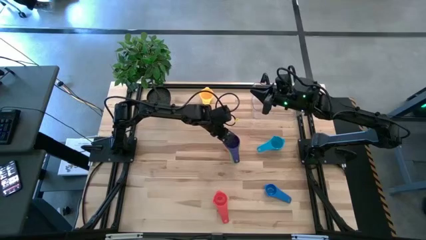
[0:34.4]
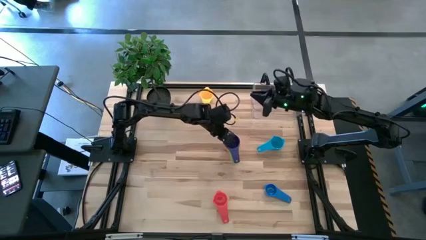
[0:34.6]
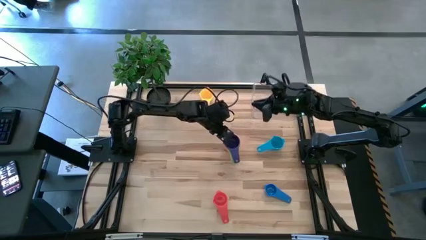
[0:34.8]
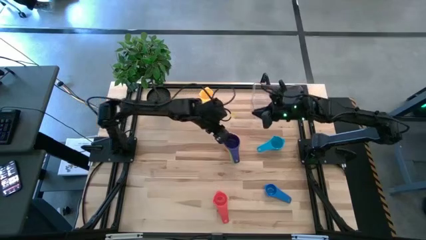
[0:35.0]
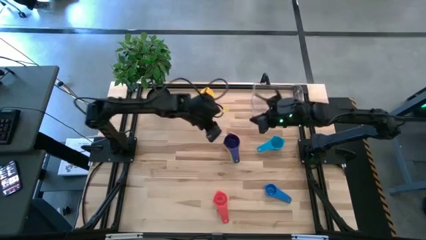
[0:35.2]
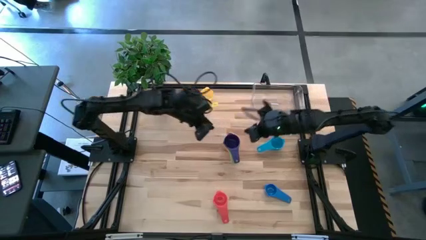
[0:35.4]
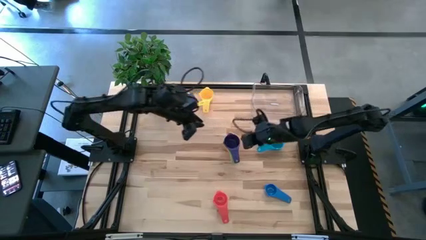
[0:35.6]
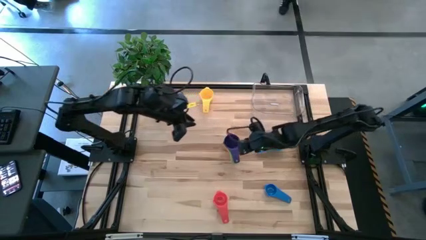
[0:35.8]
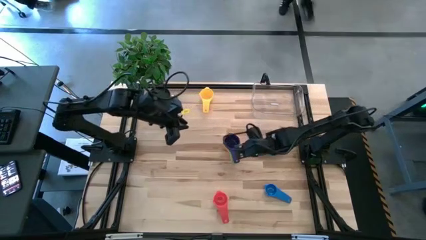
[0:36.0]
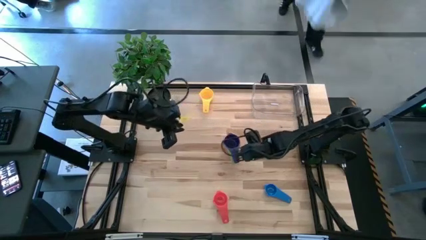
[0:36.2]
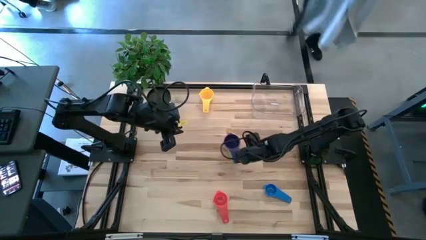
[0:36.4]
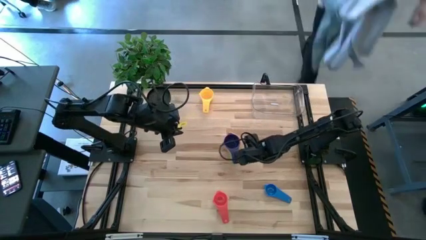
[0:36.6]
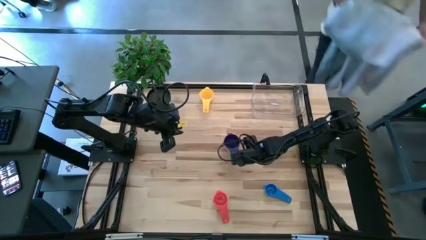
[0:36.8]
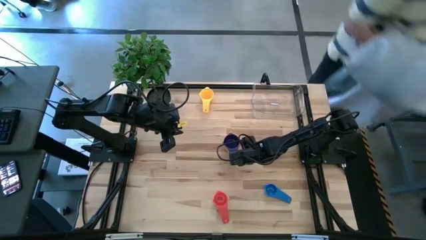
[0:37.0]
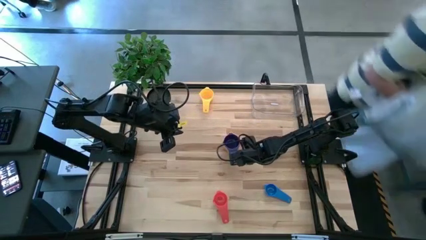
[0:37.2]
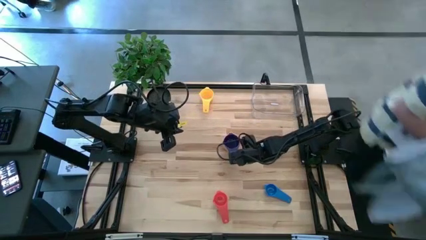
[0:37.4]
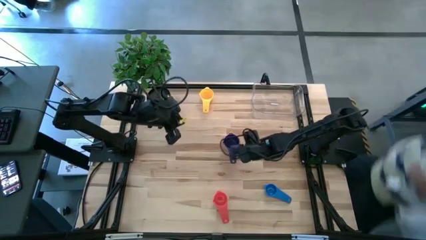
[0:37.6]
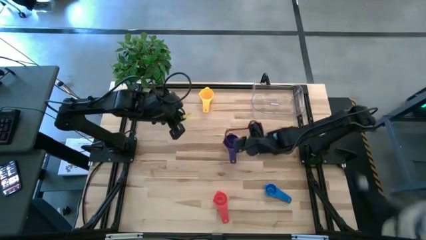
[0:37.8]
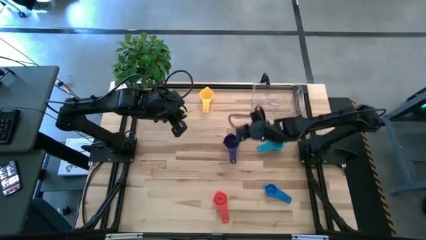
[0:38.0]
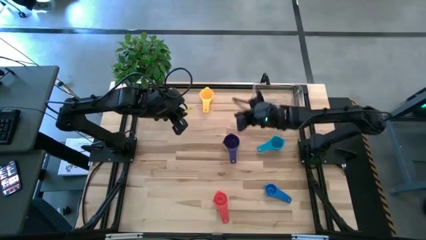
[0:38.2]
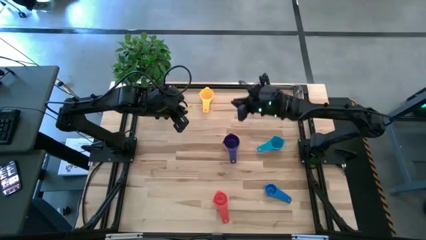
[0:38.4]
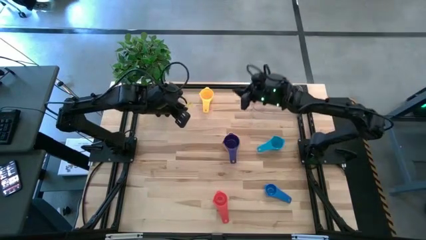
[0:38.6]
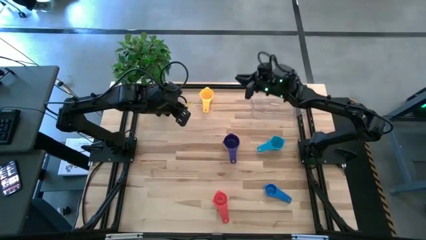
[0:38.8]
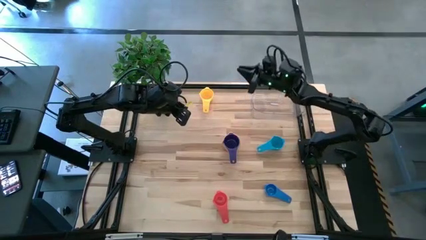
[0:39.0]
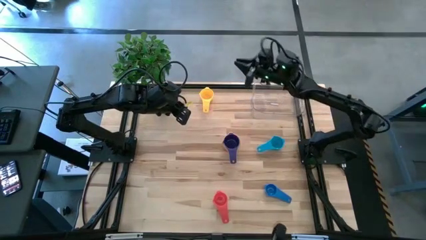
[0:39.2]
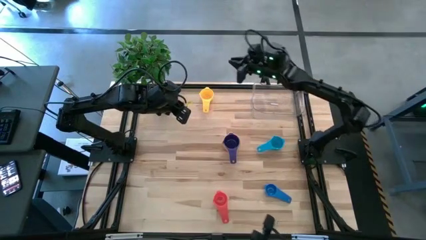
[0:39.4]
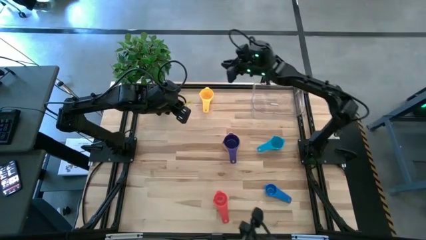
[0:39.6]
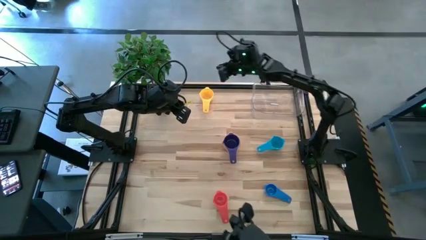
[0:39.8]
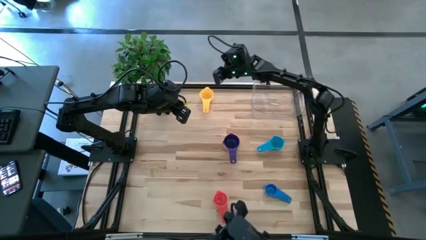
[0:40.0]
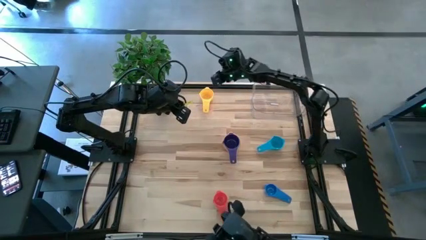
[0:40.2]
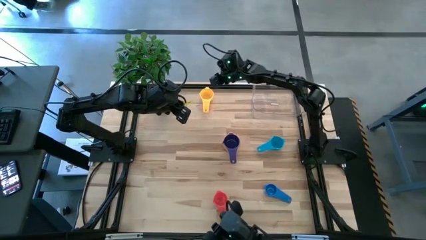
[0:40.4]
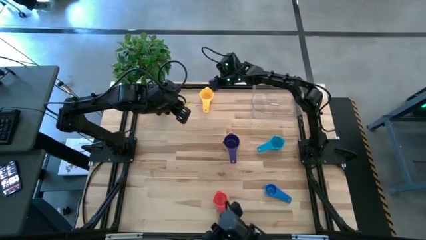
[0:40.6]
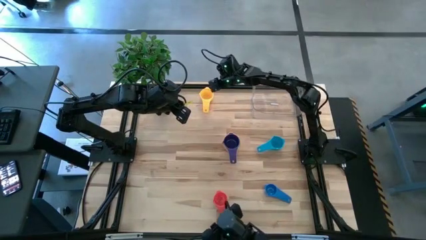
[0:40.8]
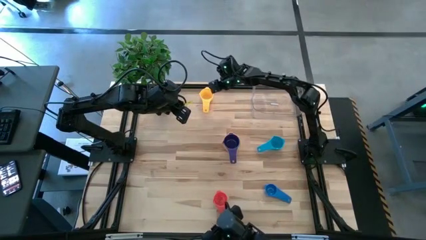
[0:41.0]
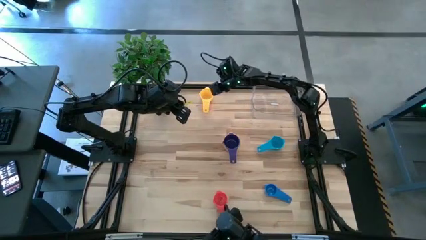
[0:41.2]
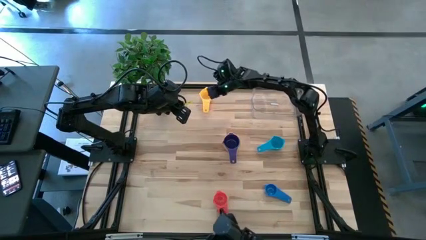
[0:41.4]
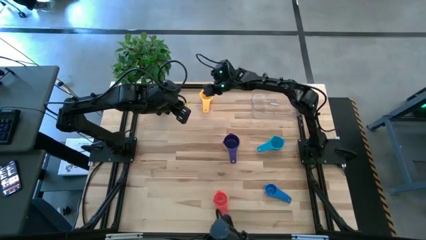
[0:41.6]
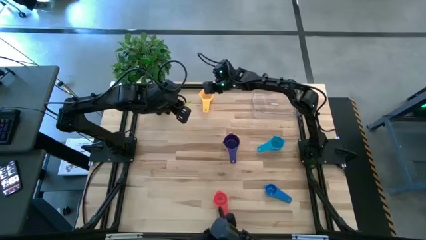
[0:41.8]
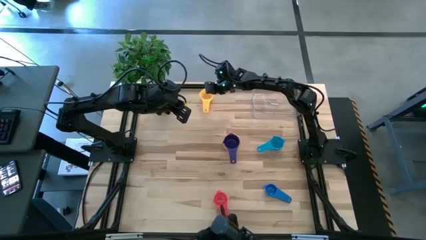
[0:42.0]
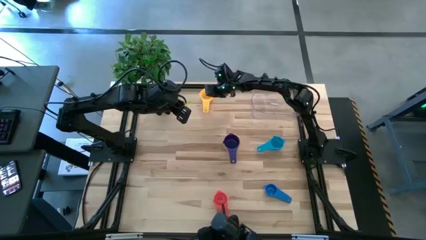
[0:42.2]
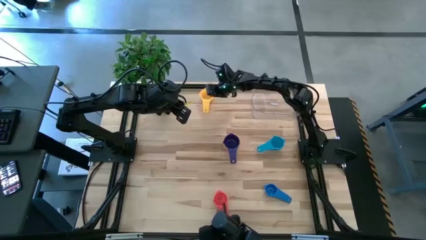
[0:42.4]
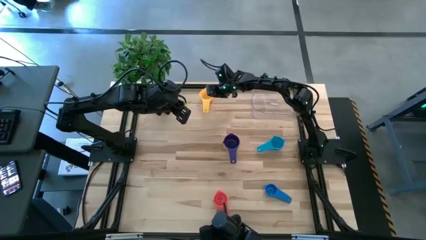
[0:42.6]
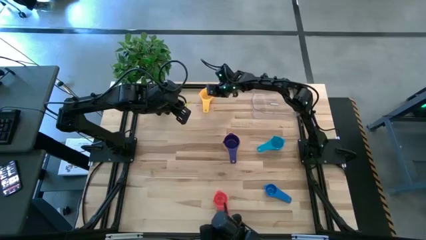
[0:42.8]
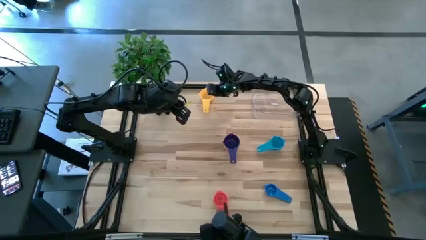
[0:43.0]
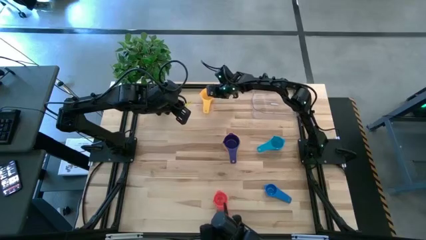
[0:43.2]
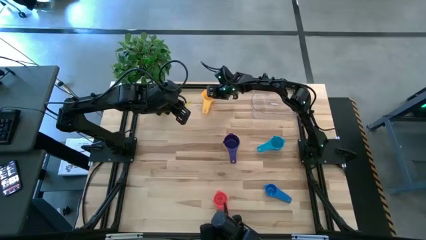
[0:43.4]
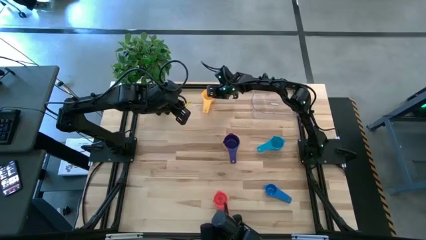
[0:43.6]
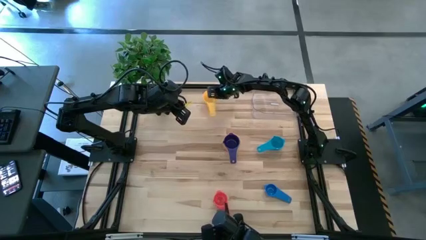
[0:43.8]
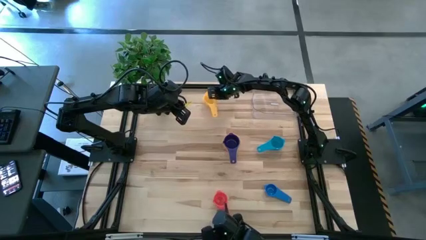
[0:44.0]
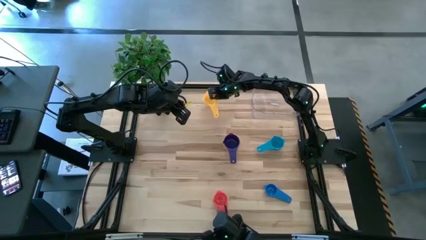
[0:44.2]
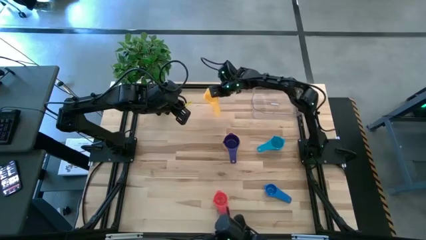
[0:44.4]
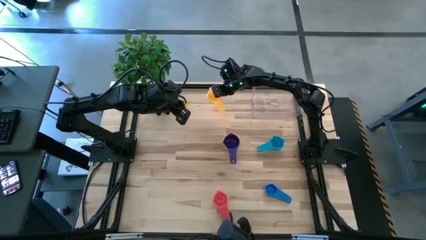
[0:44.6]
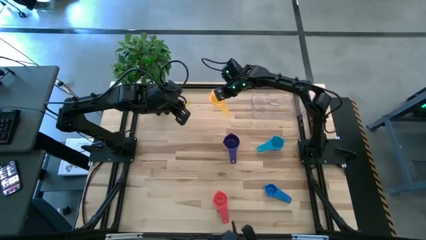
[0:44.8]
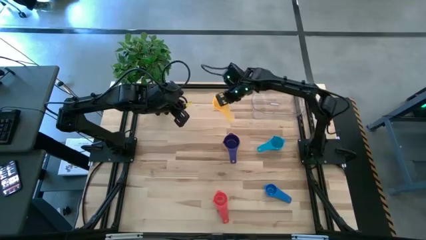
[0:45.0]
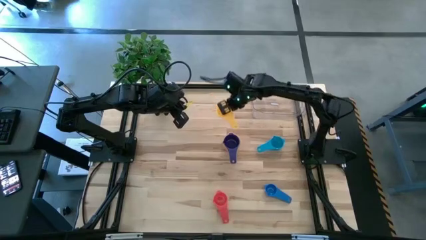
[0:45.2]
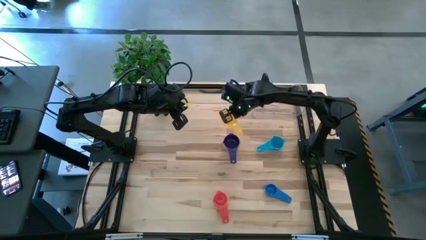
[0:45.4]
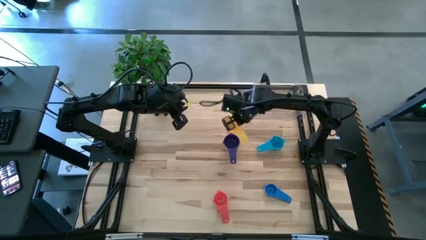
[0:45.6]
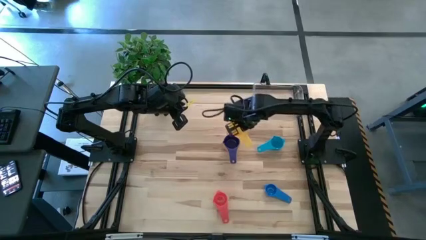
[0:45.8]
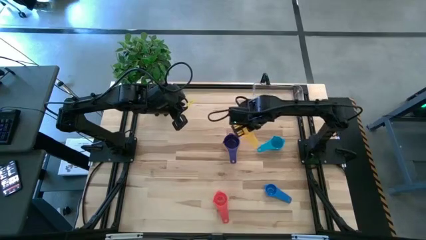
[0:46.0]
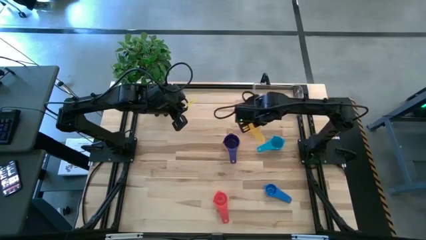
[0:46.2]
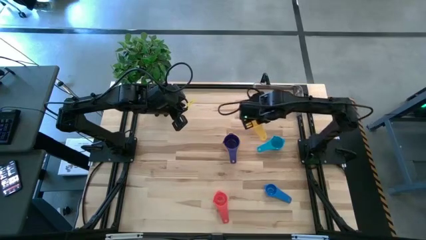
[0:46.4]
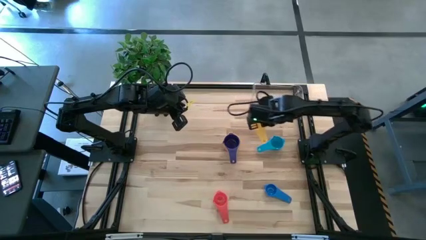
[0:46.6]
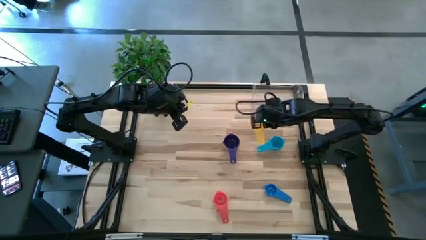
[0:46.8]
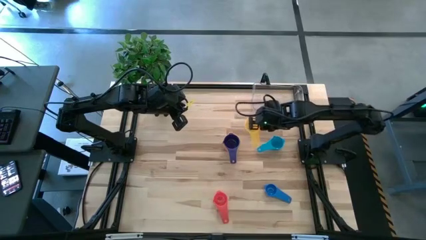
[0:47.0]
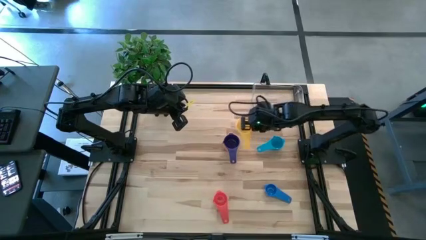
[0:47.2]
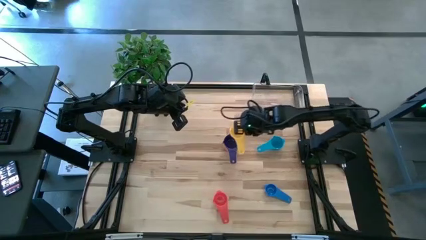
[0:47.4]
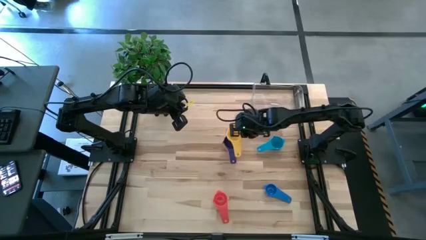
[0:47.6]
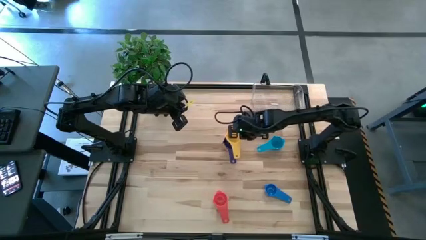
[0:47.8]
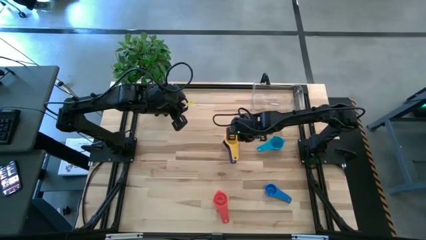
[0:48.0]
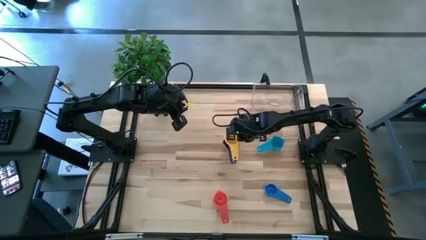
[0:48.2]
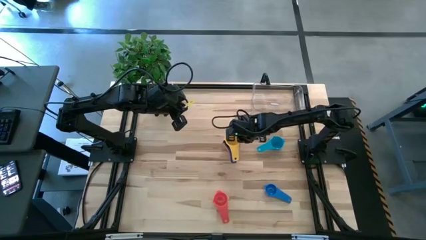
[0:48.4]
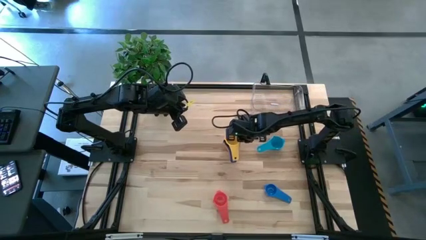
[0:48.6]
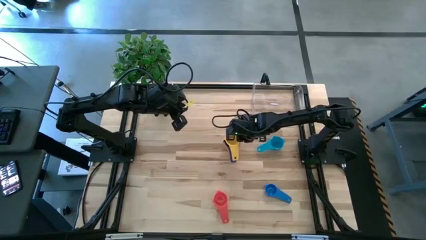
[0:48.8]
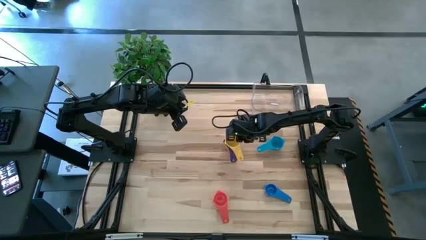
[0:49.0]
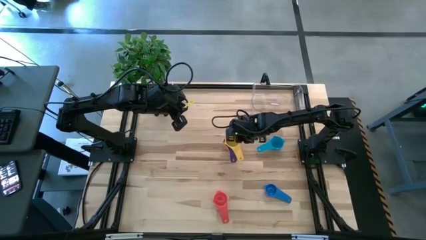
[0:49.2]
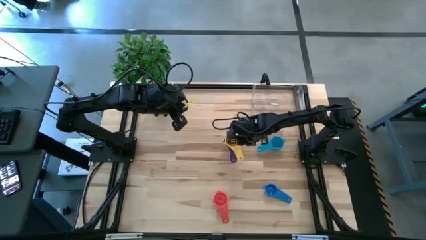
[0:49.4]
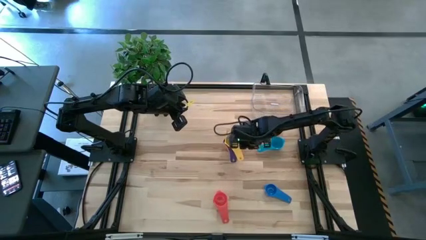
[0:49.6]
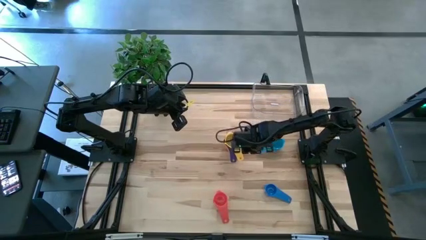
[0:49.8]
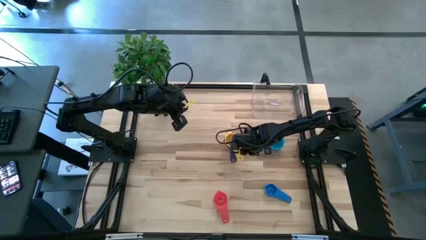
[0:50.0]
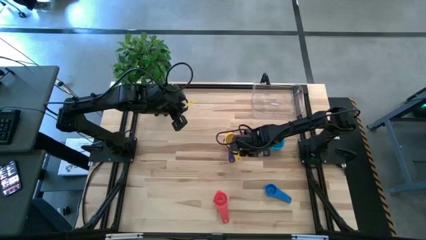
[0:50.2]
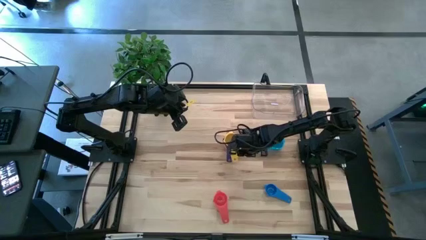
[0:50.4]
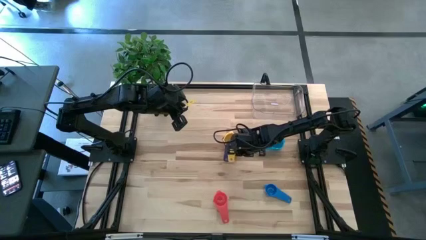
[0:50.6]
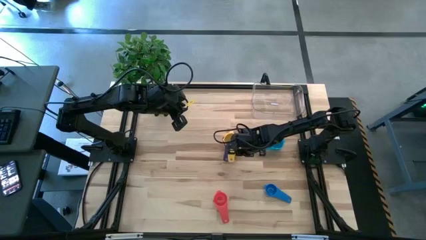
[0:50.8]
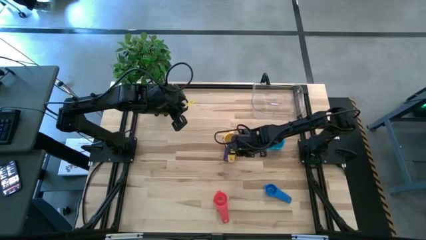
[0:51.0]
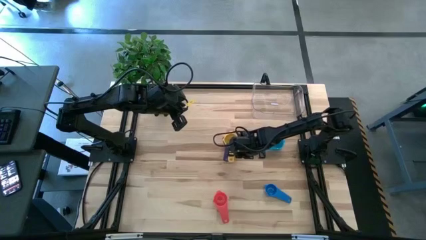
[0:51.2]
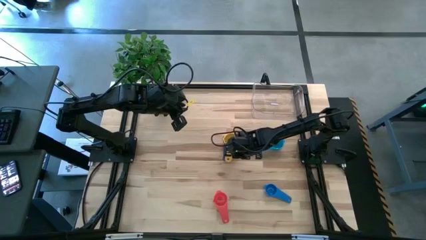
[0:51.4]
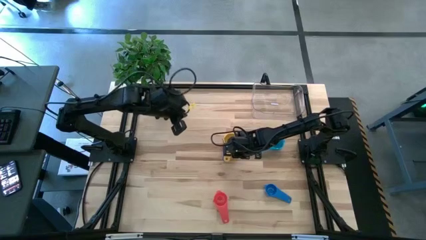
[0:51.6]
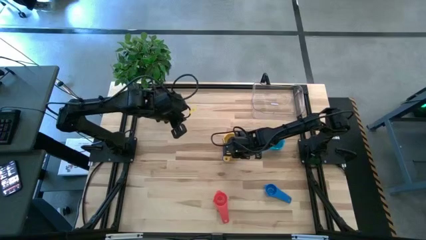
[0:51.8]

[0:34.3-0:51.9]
Task: Nest measuring cups in basket
Stack the yellow measuring cup on the dark blue measuring cup

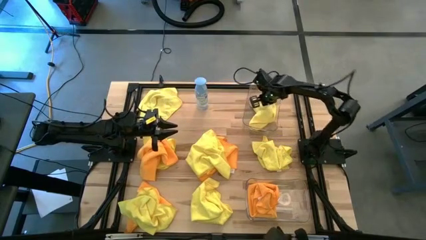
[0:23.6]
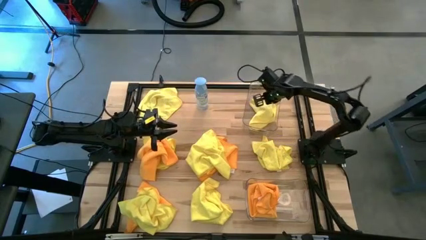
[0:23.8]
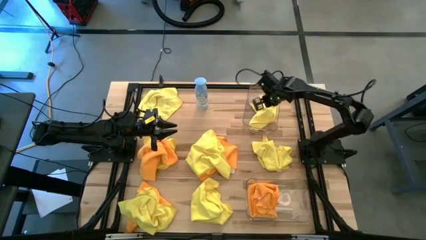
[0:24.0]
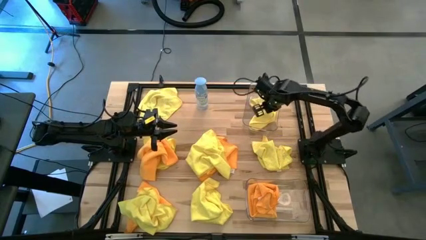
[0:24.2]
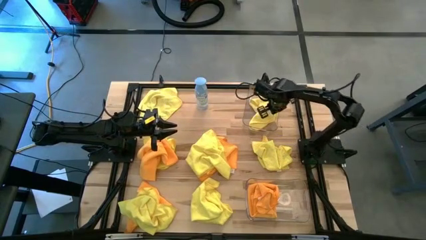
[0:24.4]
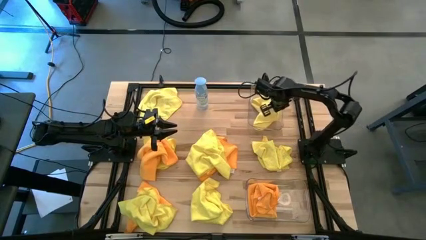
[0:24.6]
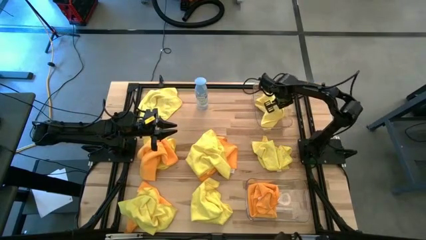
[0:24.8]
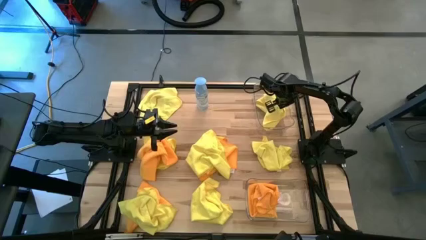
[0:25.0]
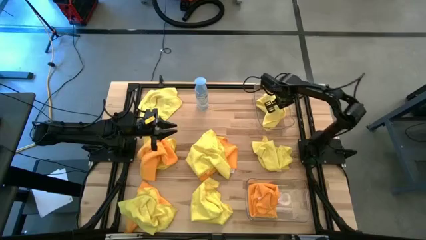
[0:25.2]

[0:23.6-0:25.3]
Task: Sort microfiber towel by color & place in baskets
Adjust the top transparent bin
